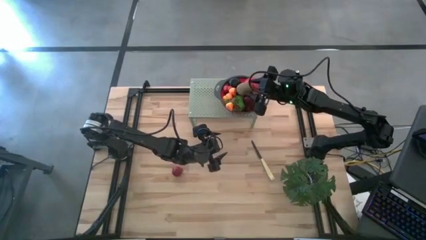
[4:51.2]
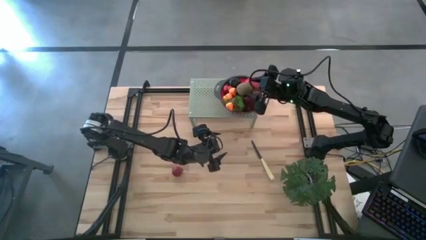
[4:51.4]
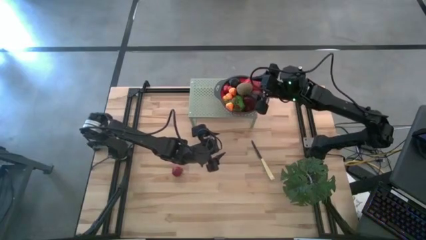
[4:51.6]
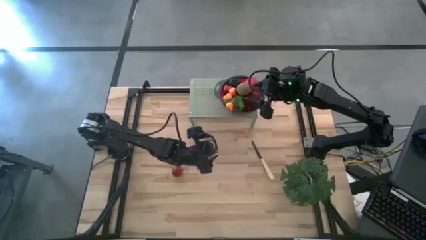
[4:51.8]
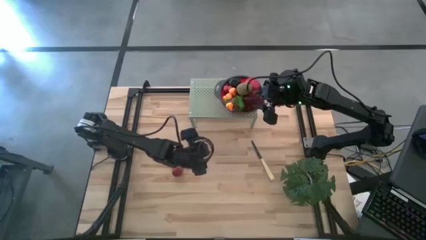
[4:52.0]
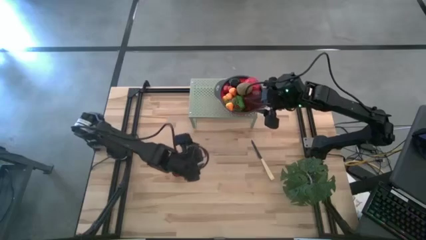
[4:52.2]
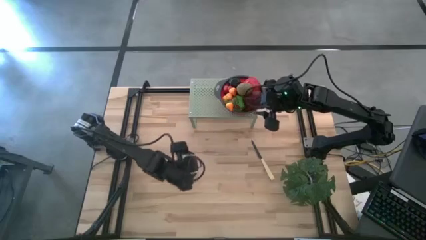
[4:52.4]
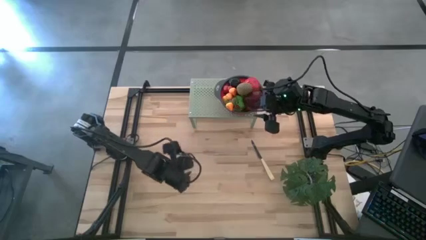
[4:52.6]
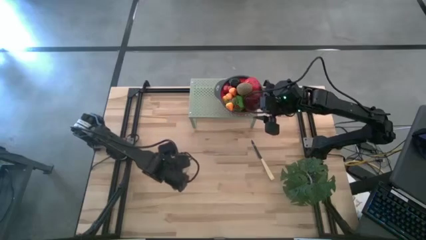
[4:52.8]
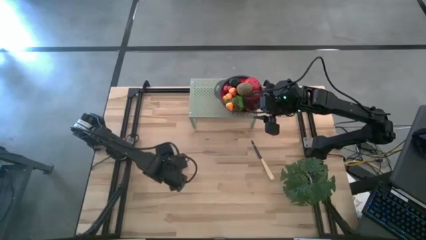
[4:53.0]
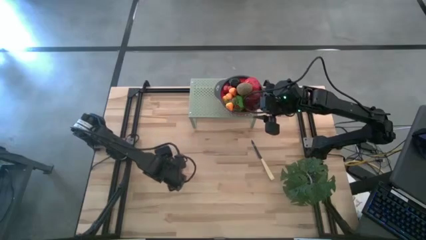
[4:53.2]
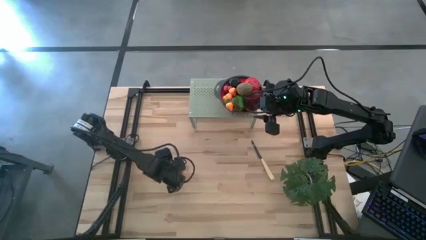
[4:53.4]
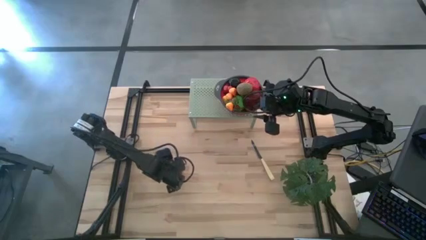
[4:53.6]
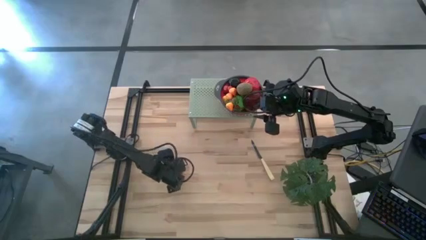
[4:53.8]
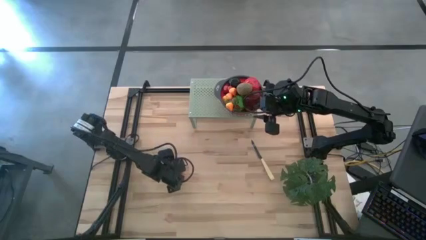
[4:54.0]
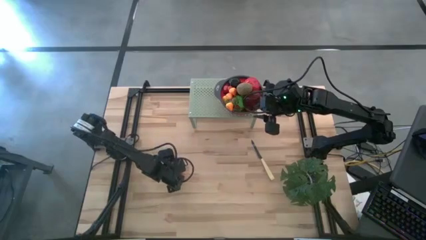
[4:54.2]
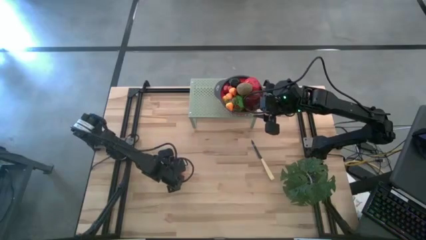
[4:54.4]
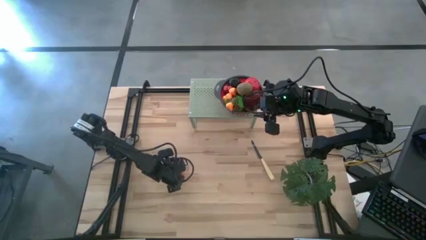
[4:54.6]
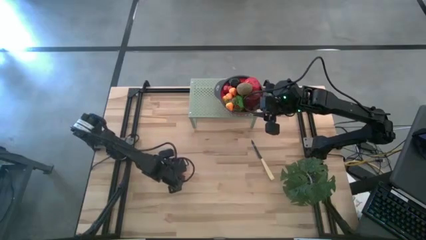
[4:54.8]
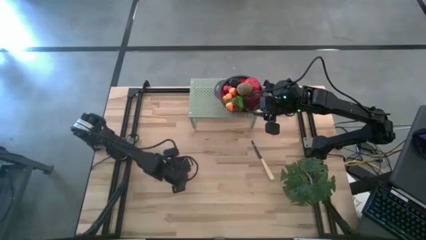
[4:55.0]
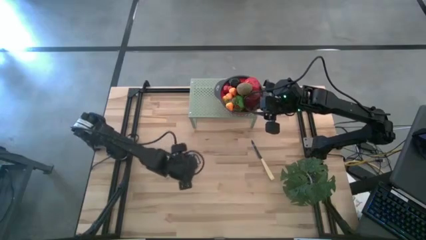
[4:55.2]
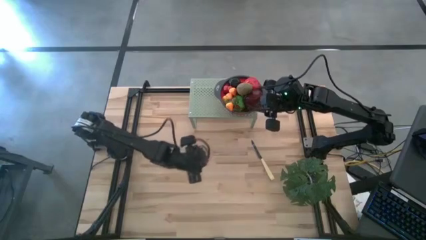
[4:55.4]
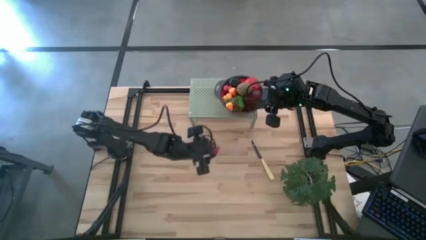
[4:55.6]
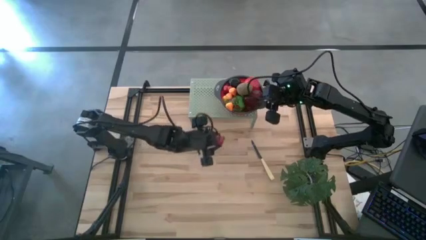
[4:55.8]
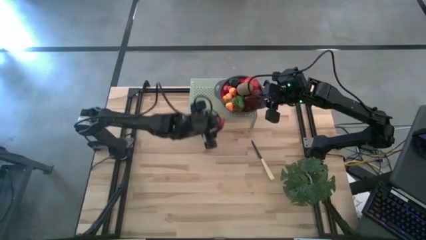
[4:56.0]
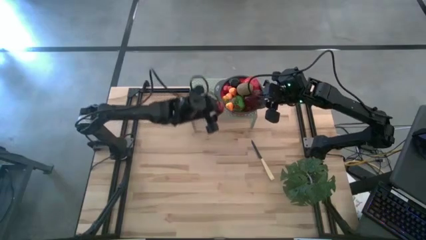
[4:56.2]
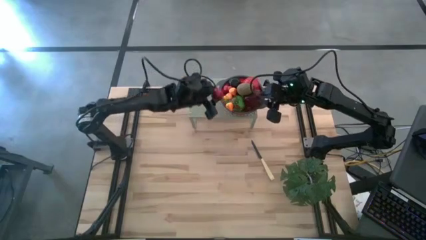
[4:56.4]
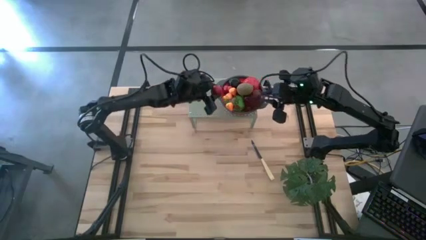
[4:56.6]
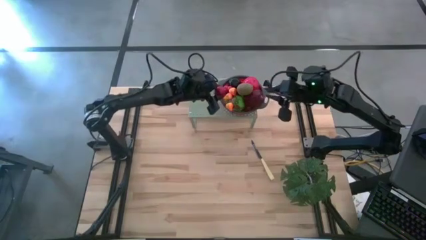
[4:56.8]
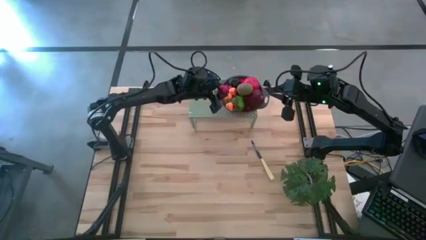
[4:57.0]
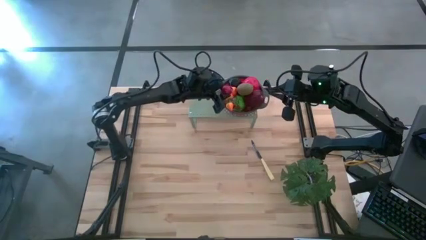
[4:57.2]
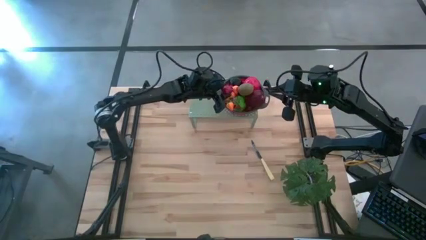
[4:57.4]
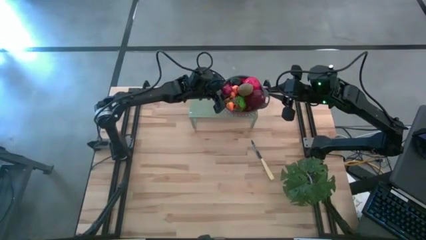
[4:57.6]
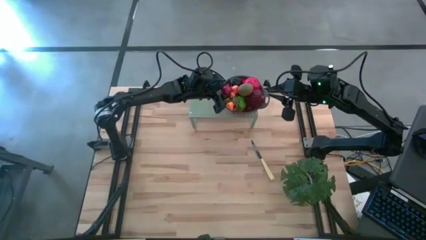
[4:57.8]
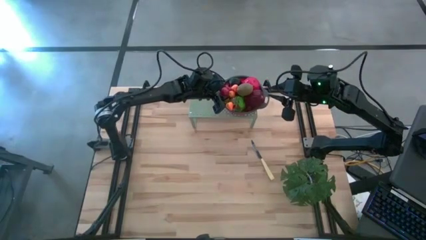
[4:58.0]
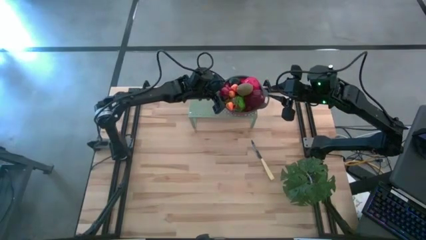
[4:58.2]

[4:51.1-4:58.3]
Task: Pick & Place Fruit
Put the red pomegranate into the black strainer bowl on the shelf

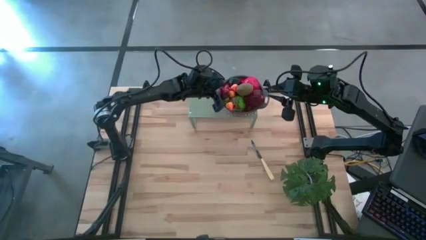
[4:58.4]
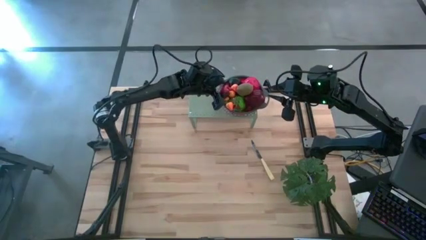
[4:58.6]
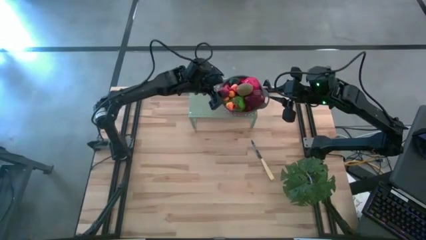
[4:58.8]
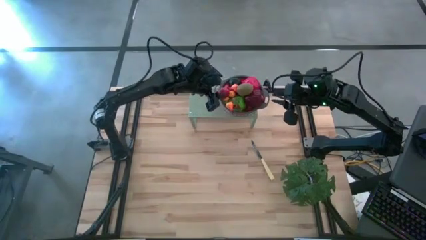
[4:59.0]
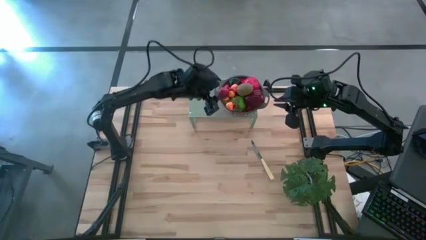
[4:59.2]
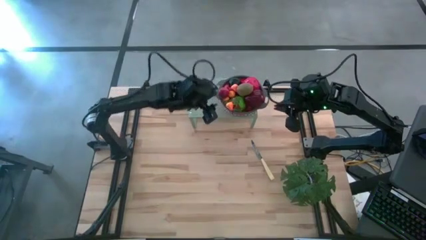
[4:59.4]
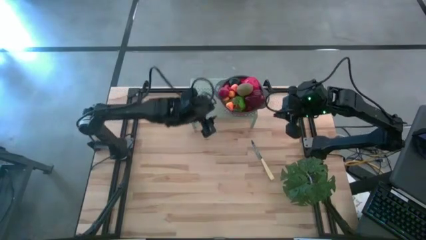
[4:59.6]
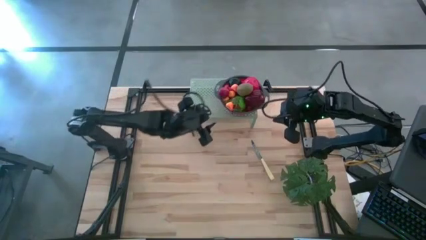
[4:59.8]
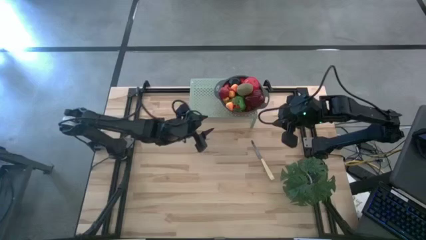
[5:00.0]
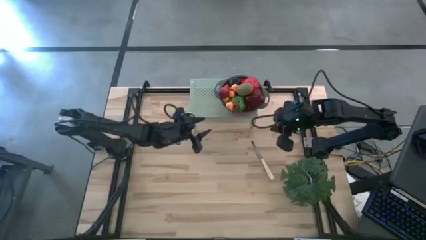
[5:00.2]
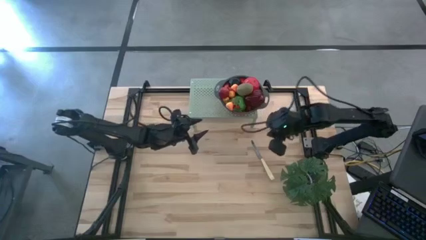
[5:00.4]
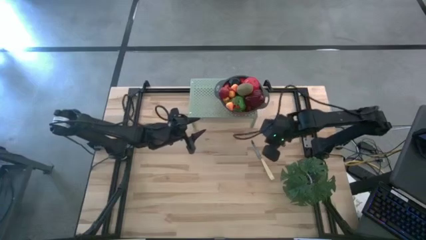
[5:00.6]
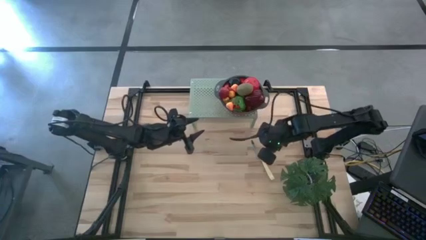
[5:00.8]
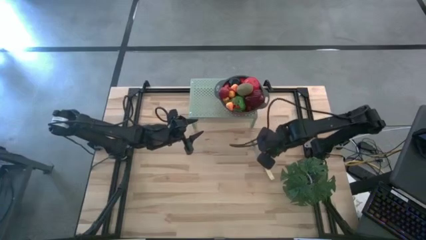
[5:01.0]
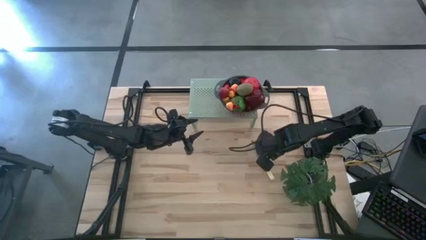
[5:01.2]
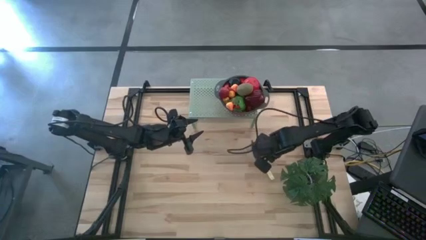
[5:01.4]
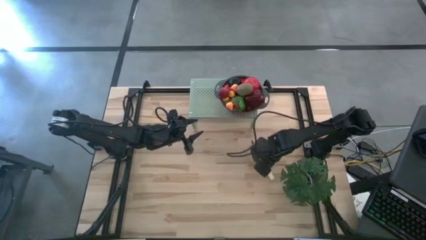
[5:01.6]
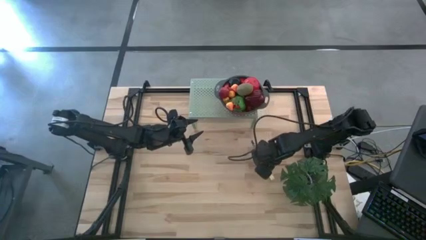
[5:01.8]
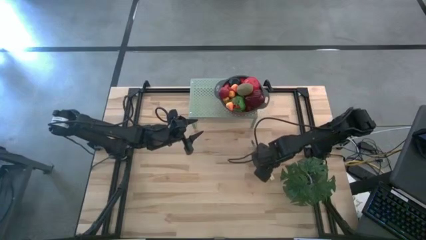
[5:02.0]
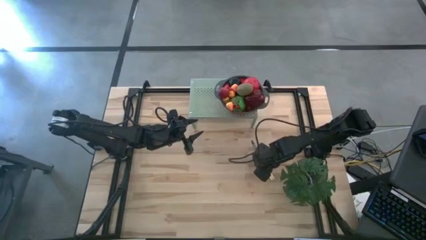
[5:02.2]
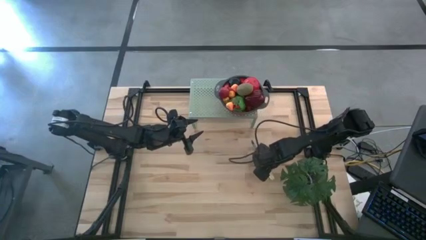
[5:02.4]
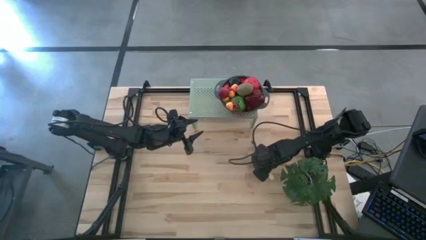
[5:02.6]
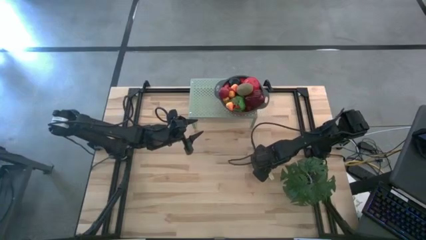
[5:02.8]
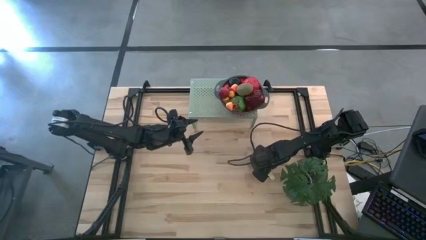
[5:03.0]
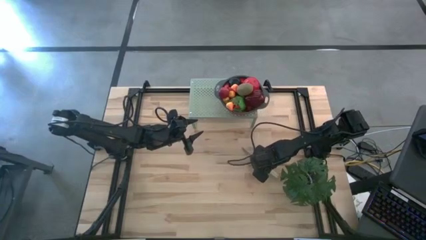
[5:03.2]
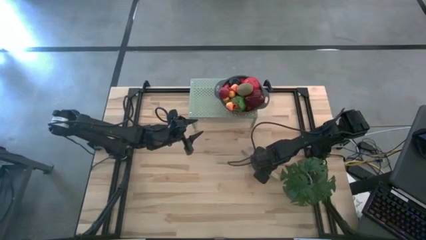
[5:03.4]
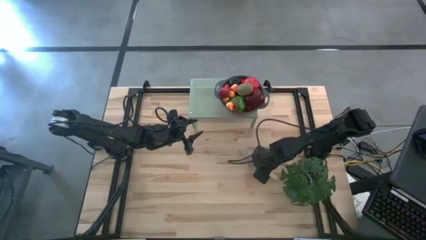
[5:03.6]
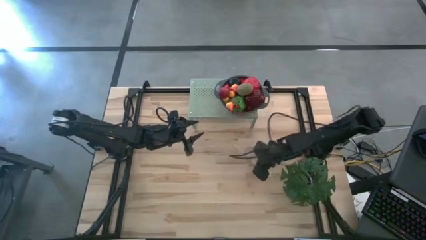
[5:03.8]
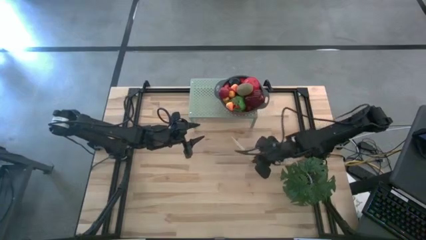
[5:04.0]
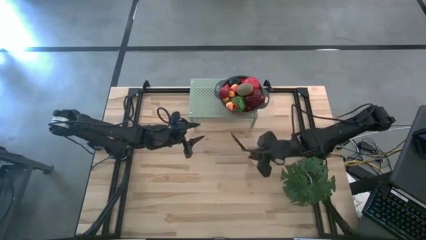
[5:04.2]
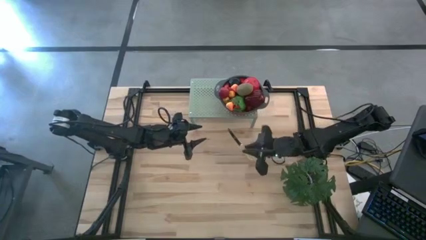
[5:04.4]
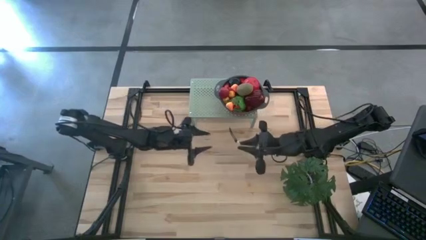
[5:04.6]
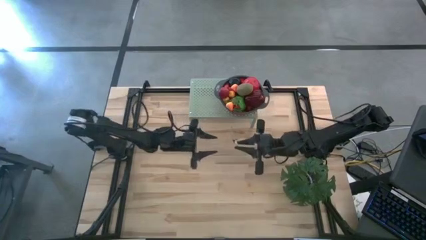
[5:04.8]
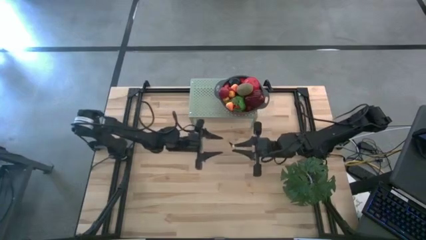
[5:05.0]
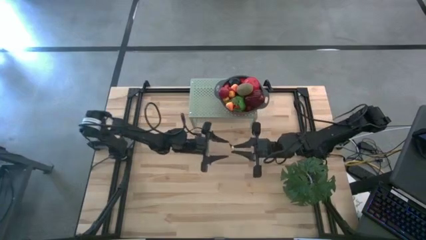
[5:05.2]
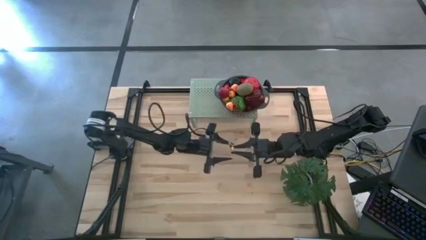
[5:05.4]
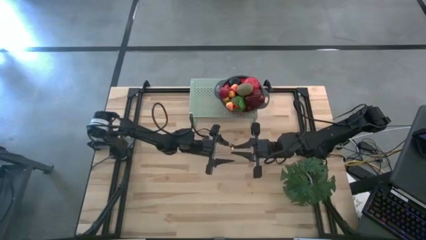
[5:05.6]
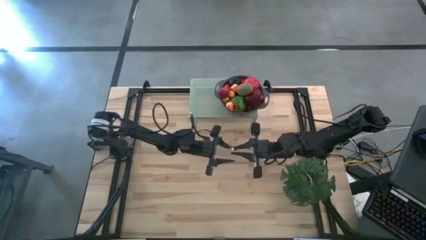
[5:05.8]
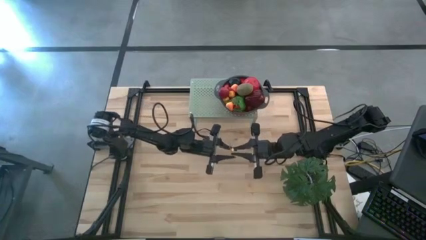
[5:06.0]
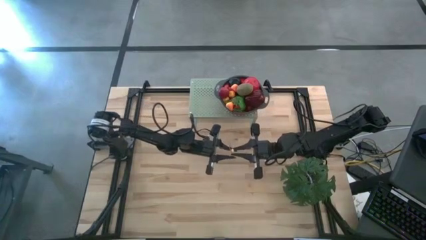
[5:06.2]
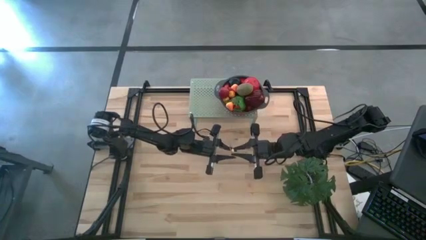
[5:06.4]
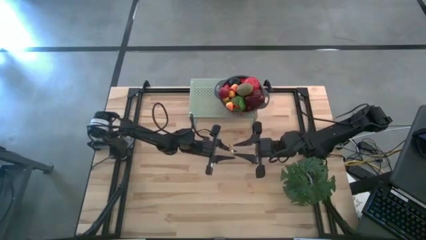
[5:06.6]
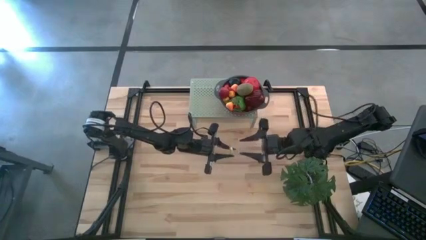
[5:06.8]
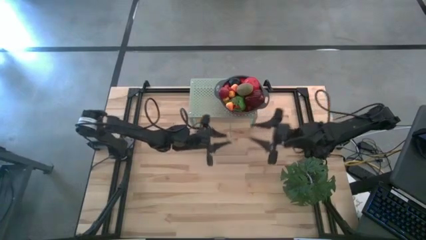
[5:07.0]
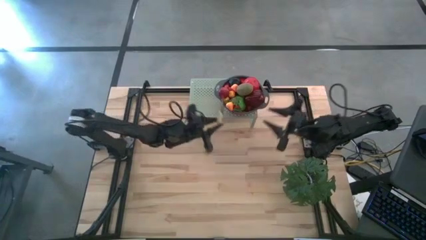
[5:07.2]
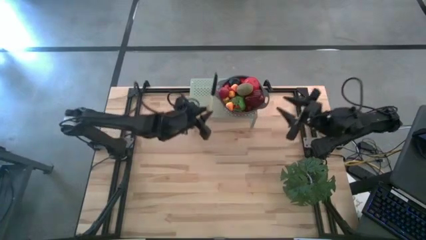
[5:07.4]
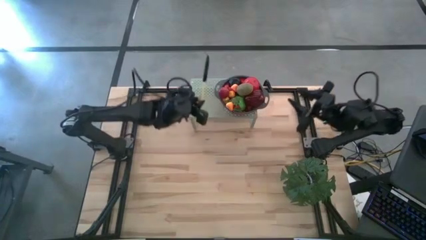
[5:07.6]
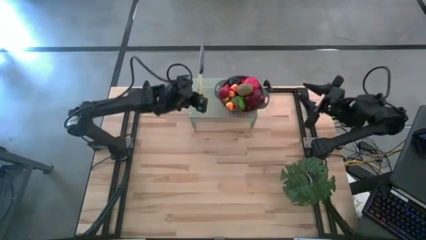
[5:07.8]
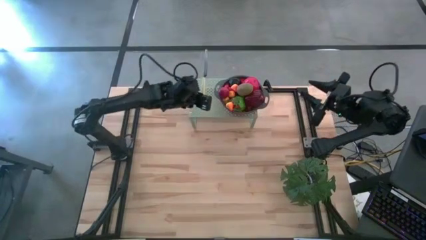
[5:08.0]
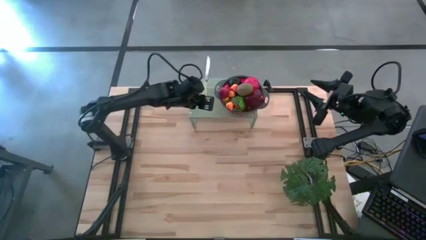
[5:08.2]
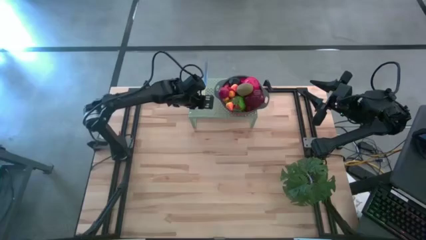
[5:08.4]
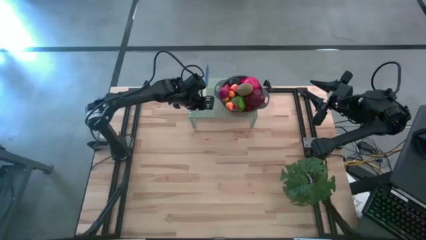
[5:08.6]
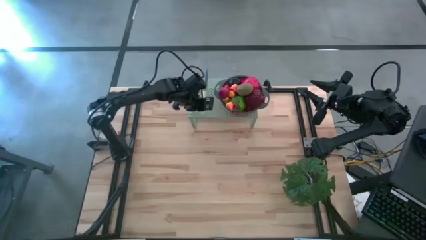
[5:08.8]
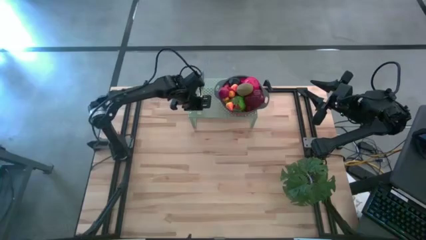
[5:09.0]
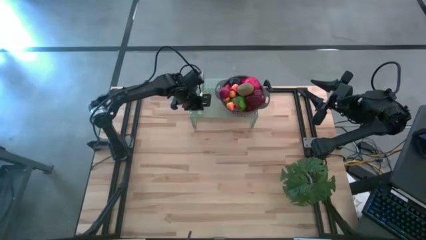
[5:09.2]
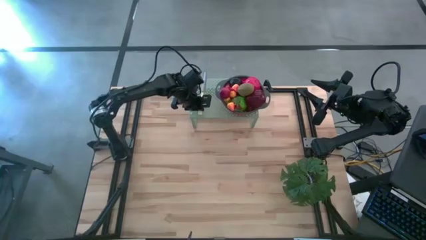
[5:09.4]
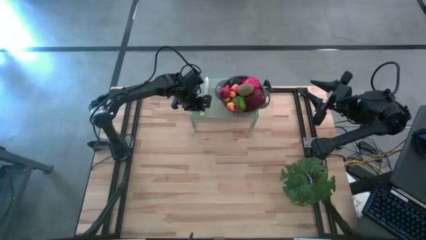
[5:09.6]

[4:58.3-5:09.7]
Put the yellow knife on the shelf
